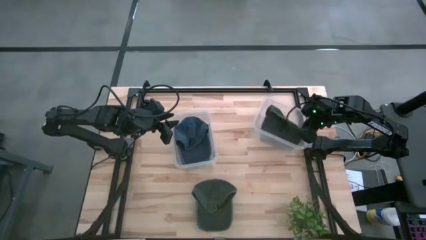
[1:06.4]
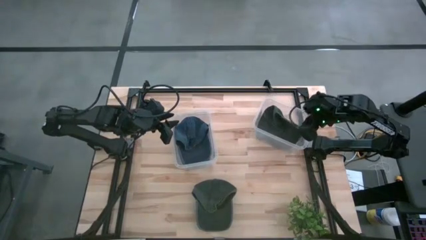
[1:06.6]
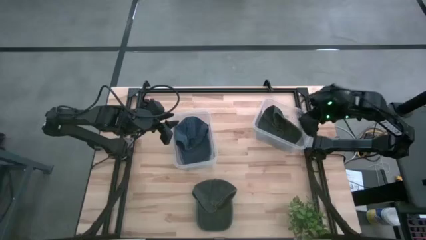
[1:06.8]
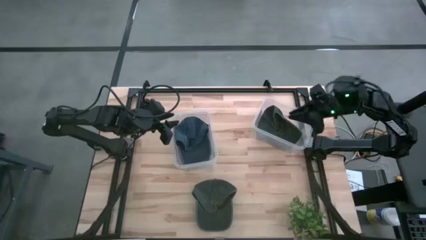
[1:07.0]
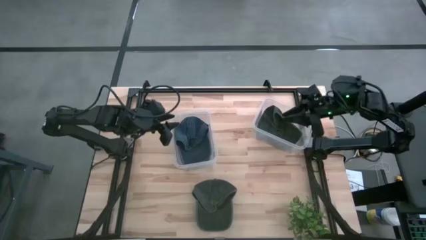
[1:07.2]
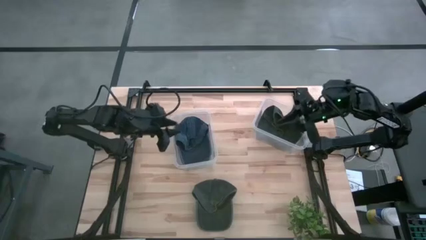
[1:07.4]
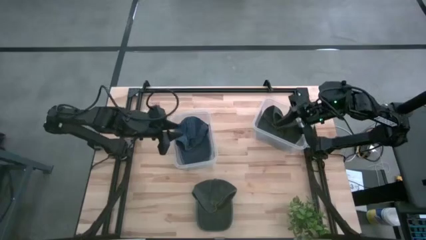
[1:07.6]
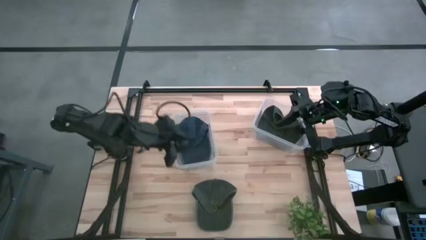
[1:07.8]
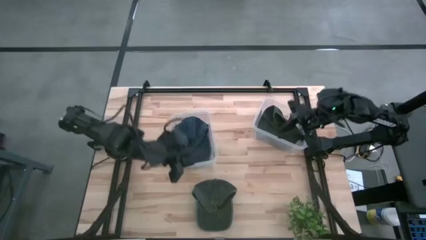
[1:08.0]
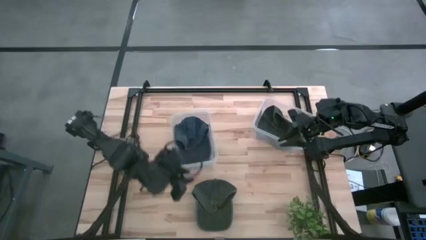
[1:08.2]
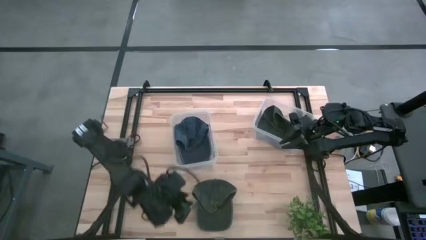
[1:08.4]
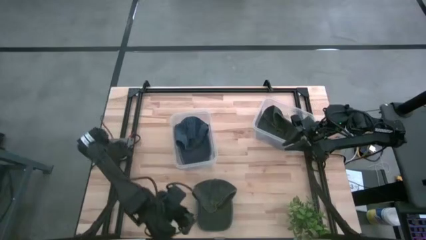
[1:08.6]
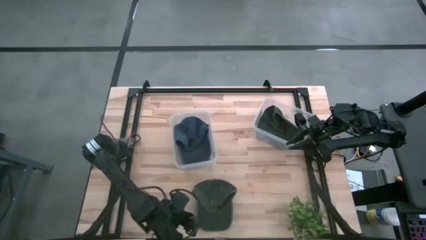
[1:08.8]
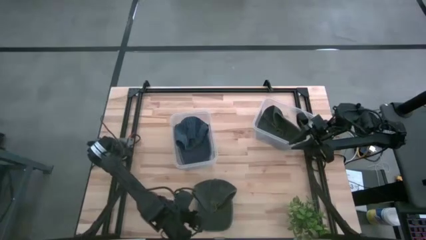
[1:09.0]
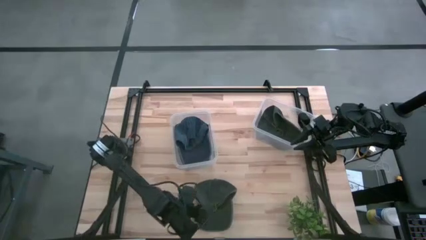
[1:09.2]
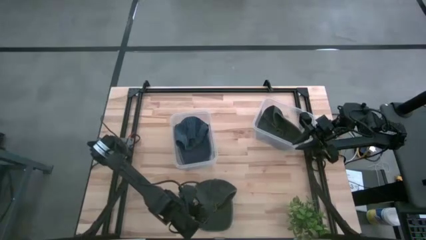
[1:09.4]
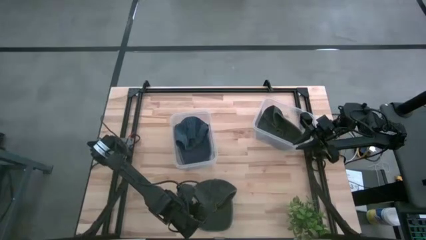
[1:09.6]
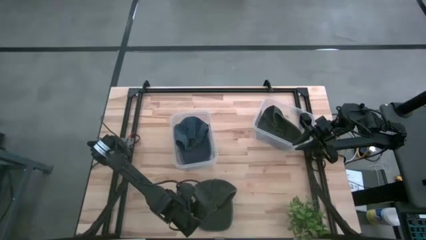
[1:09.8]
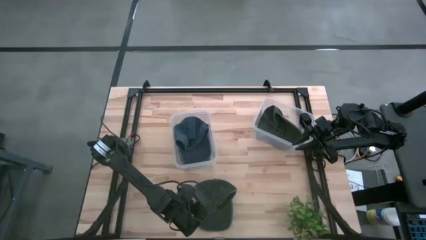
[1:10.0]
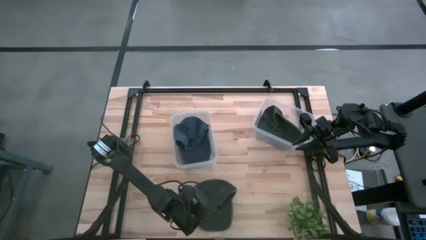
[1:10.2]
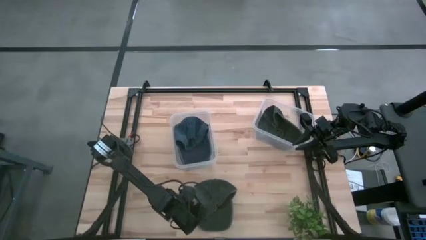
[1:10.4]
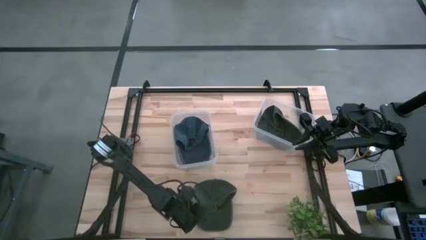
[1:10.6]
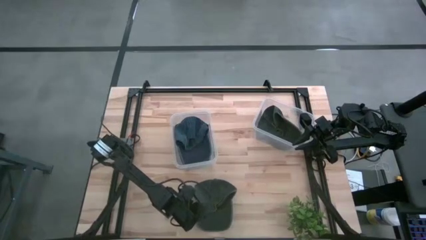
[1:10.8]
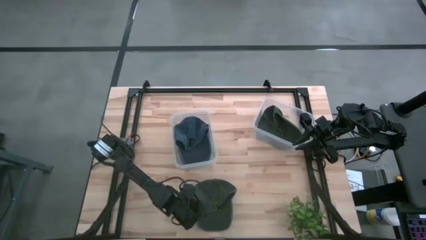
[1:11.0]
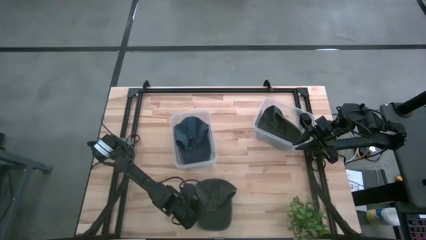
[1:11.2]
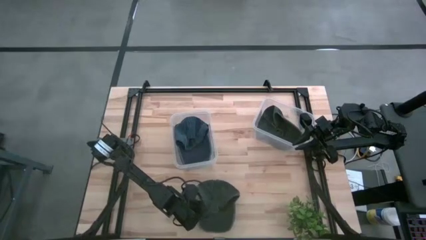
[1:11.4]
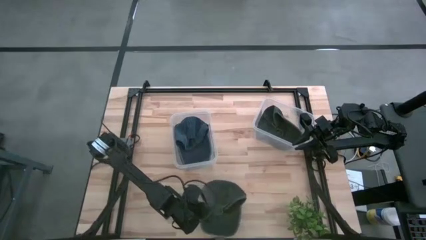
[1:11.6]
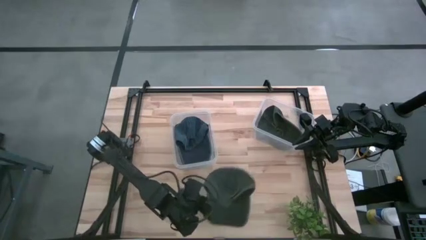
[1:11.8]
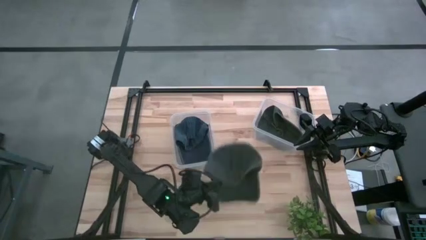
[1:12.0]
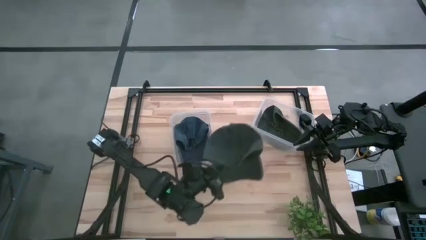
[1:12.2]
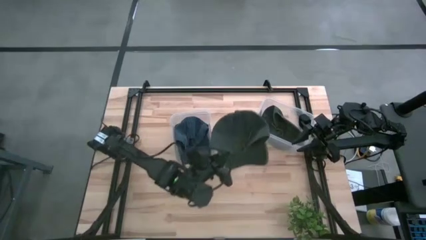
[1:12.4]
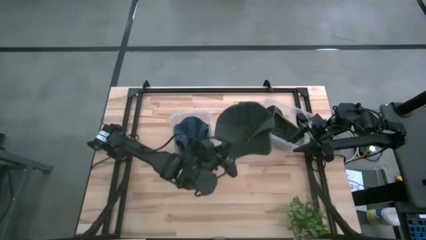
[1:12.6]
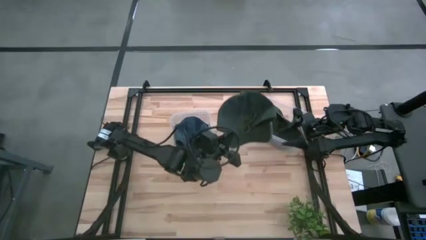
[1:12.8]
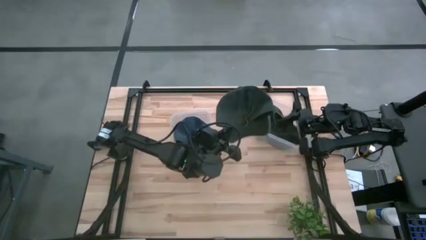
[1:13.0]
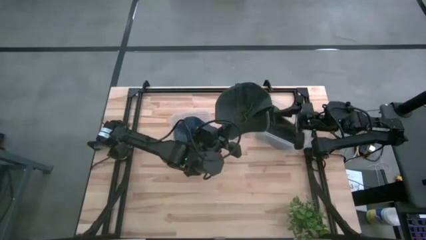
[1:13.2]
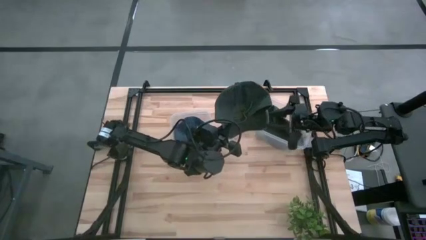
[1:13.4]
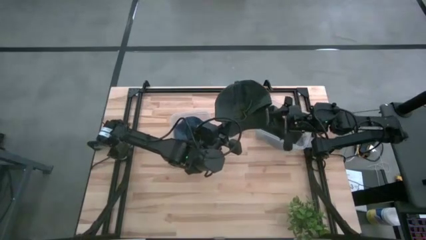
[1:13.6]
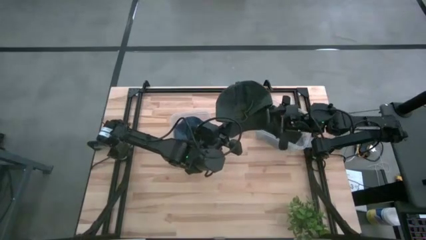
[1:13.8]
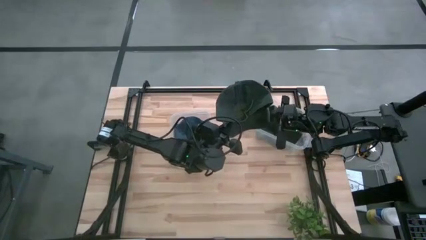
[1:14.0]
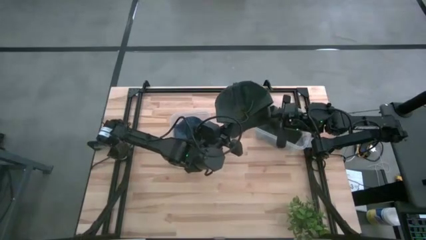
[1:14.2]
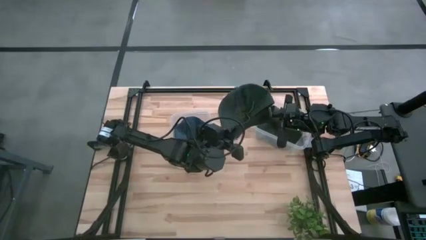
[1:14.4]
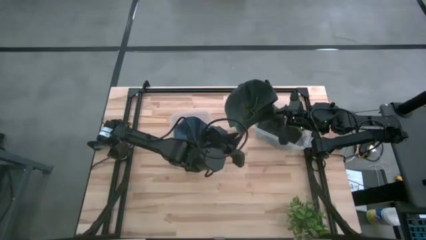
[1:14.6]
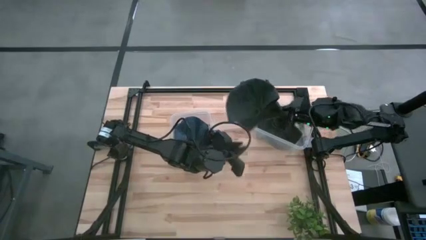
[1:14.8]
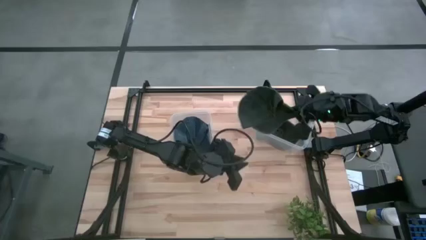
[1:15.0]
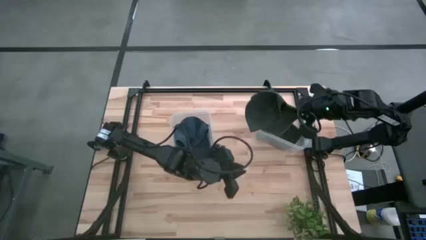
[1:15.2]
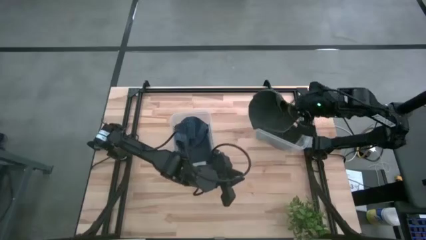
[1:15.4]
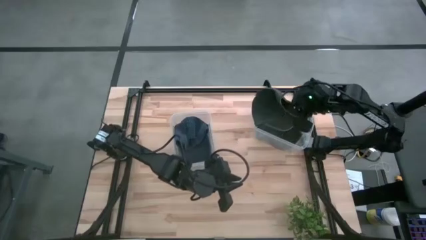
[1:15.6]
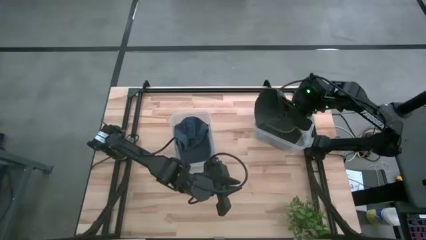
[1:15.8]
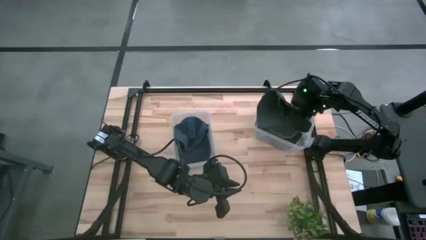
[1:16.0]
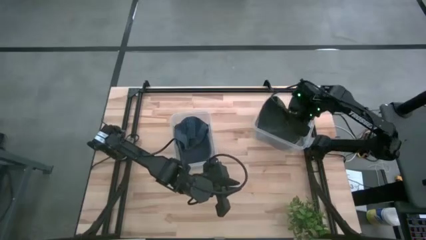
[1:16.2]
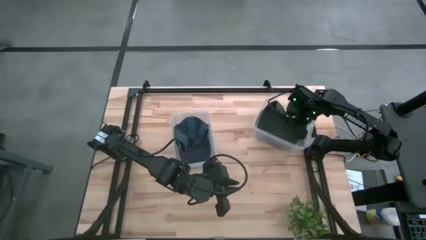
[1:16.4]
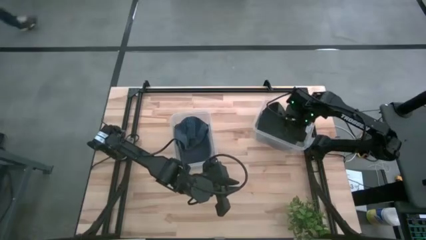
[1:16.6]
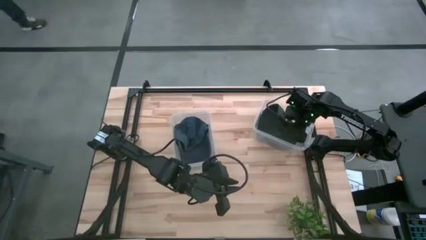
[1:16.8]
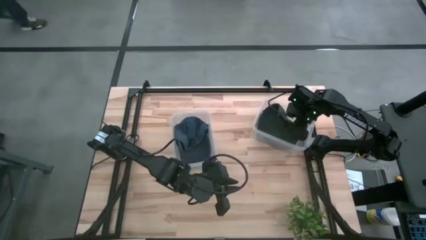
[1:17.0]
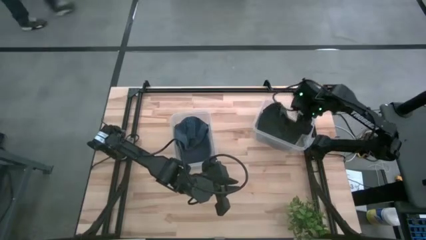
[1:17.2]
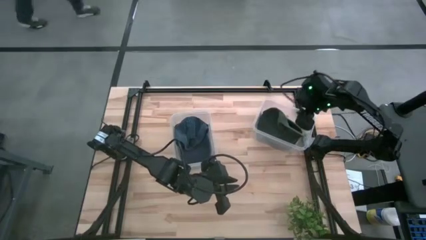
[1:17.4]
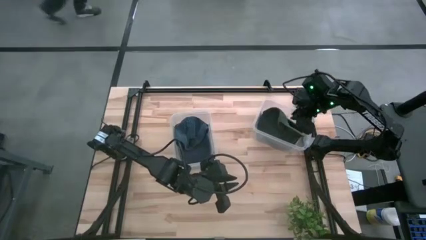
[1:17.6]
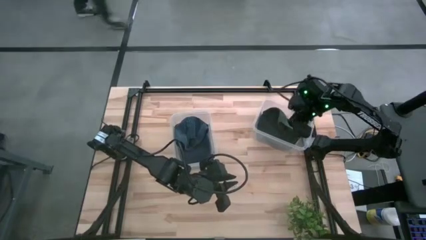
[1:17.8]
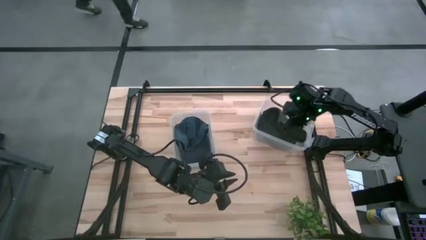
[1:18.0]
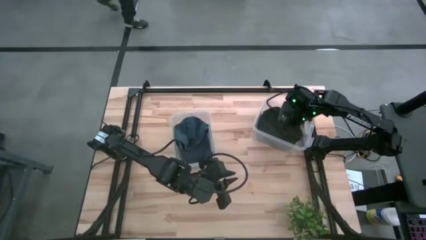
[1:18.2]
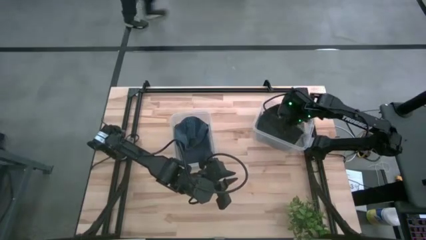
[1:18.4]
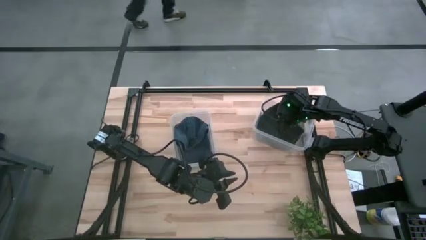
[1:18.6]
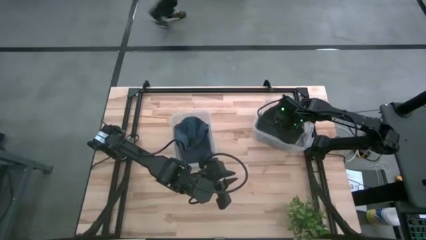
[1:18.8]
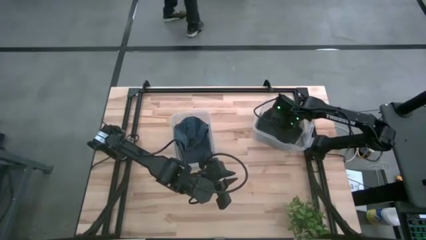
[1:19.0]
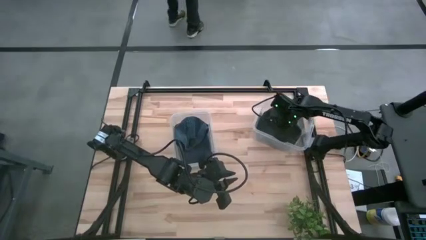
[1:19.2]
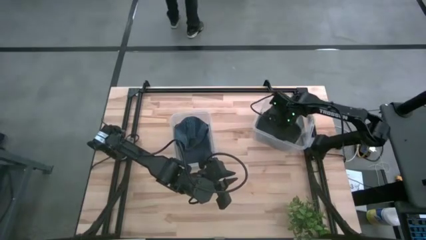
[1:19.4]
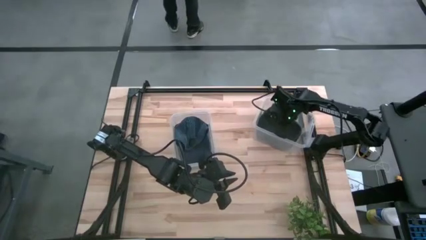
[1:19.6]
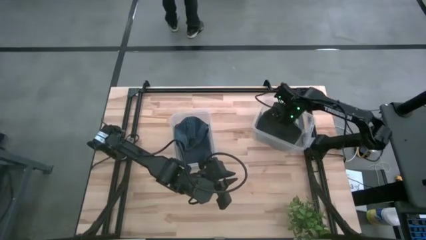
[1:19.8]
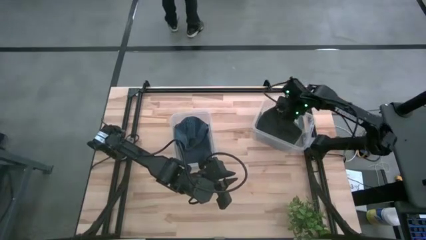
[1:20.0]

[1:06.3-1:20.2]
Task: Pick and place caps into container
Put the green cap into the right transparent container

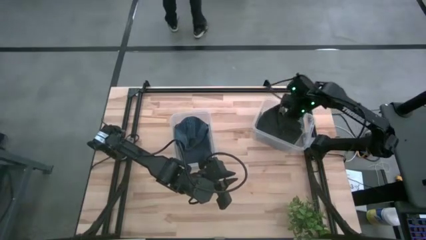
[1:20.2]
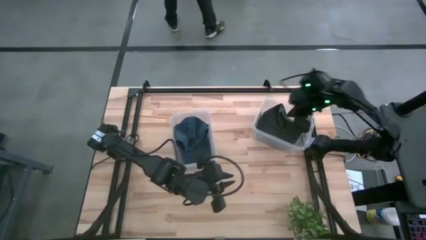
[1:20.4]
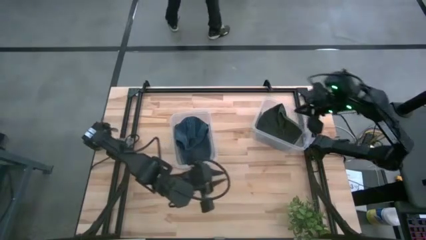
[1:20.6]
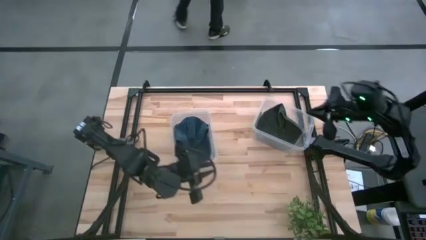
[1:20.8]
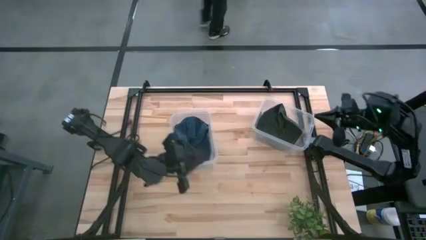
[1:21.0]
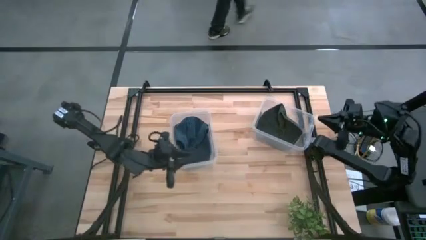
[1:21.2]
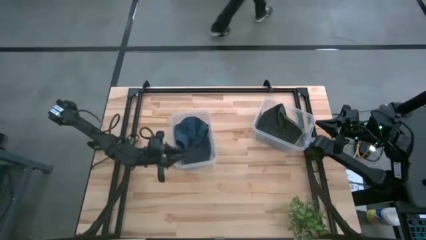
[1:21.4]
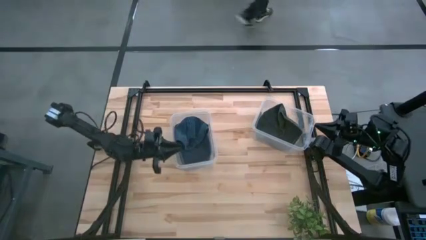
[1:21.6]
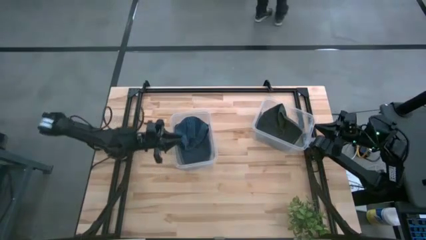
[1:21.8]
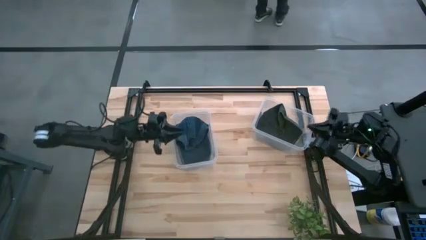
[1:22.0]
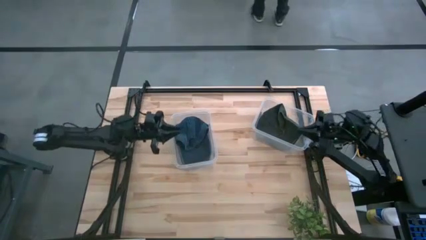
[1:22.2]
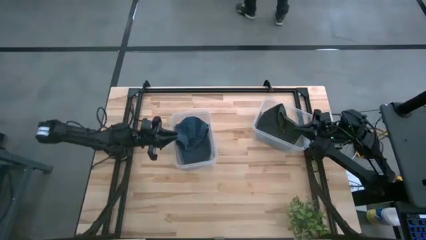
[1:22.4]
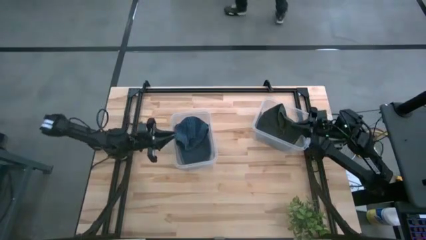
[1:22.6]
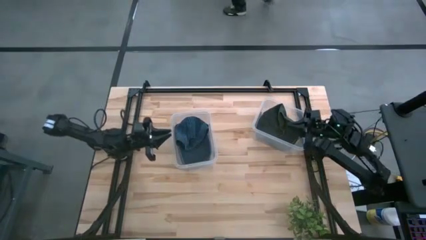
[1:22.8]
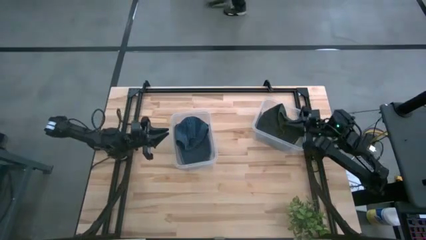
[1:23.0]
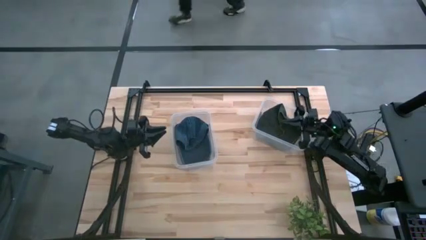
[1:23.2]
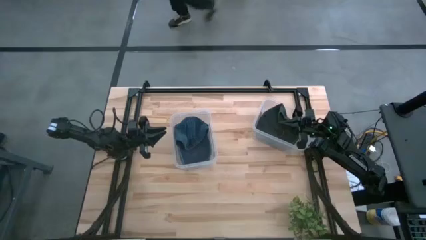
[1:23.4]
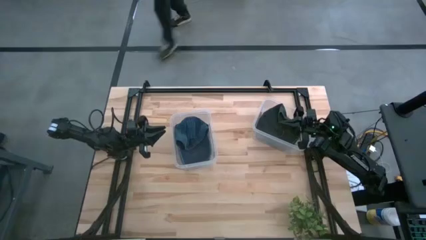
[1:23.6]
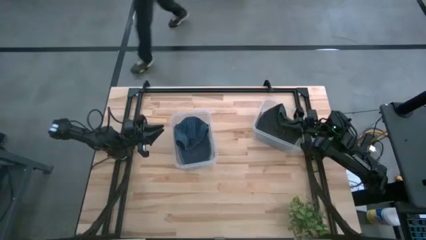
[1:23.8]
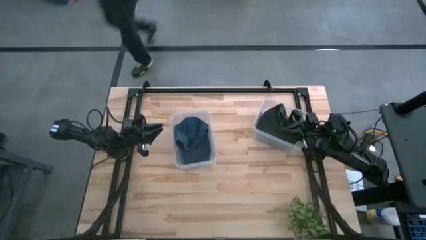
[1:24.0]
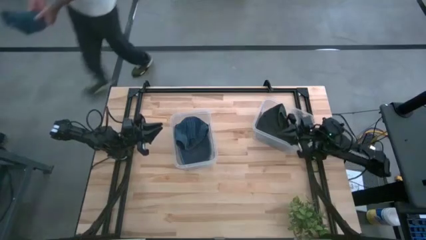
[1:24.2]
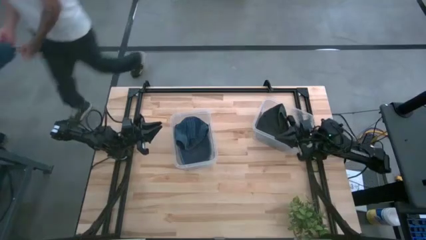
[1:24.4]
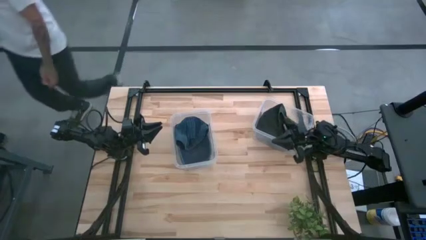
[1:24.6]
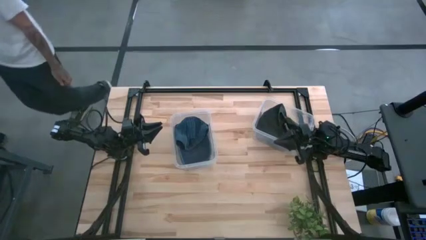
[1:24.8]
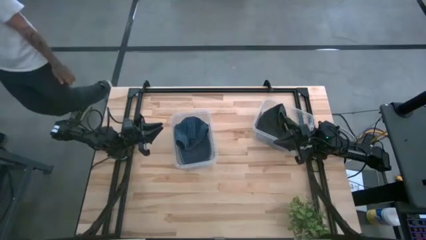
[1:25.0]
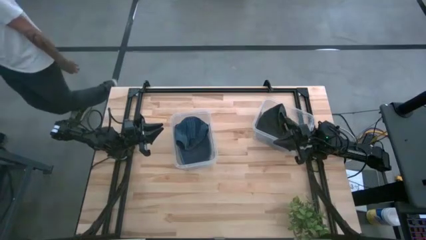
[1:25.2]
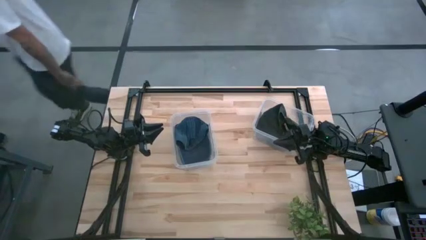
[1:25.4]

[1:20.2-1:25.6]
Return to Home Position
